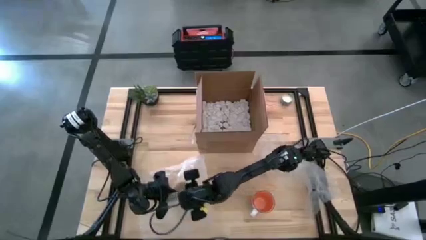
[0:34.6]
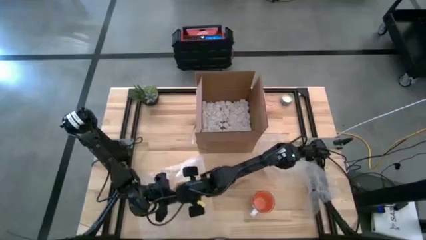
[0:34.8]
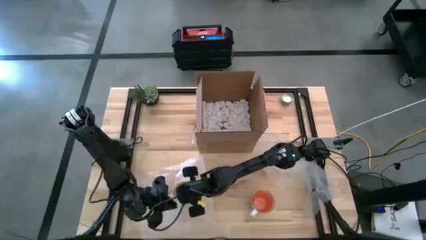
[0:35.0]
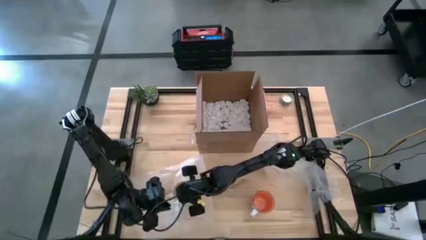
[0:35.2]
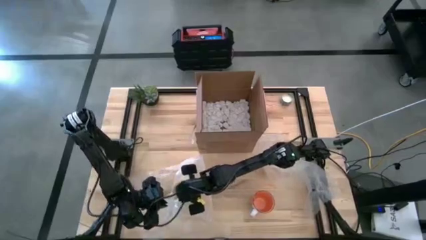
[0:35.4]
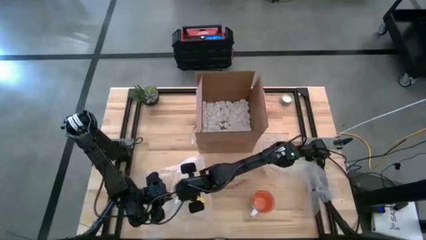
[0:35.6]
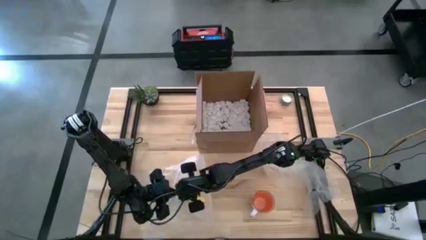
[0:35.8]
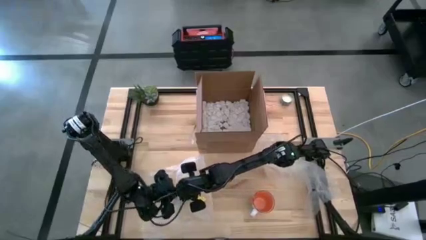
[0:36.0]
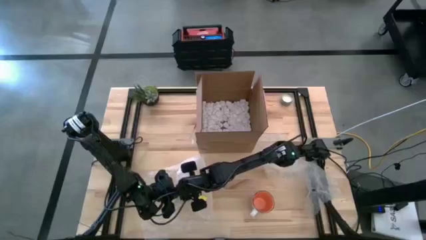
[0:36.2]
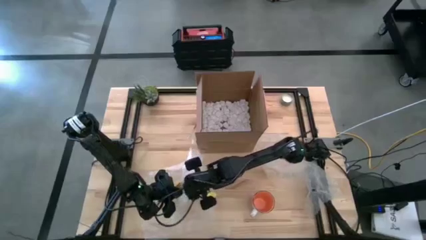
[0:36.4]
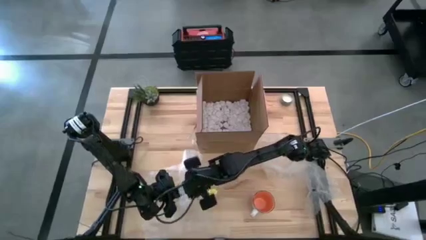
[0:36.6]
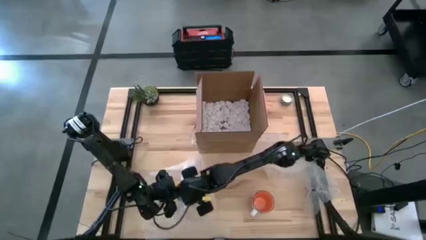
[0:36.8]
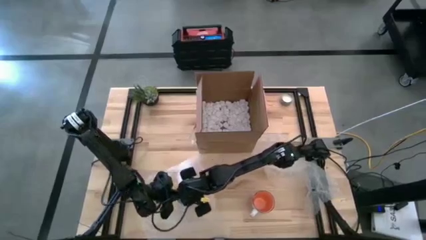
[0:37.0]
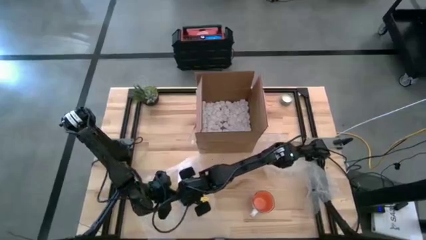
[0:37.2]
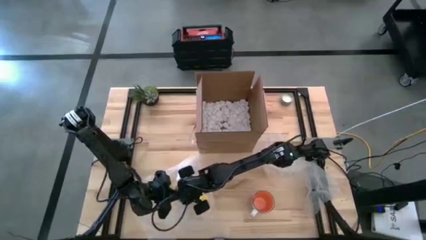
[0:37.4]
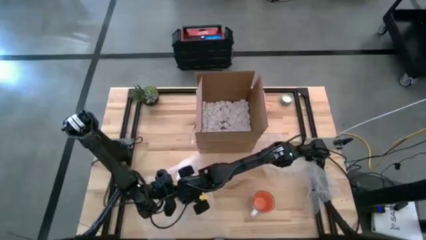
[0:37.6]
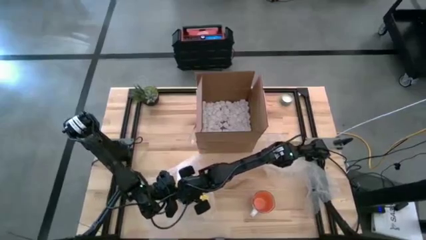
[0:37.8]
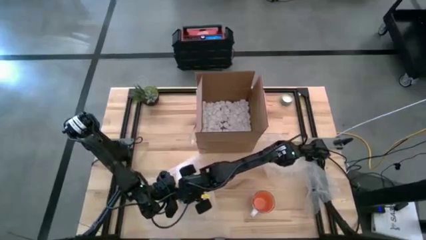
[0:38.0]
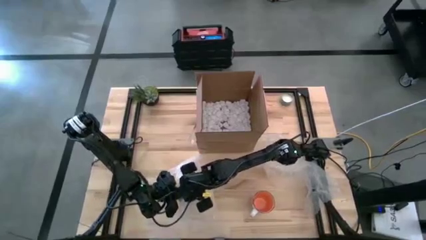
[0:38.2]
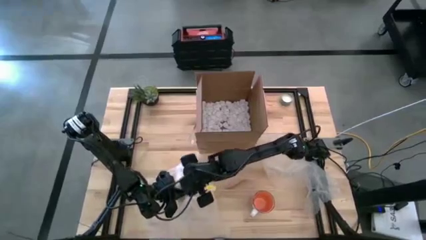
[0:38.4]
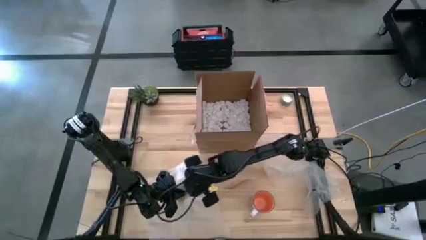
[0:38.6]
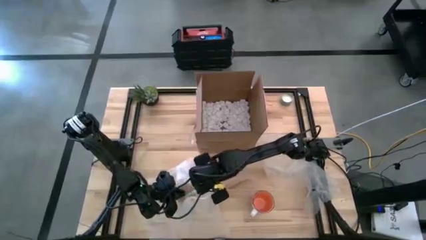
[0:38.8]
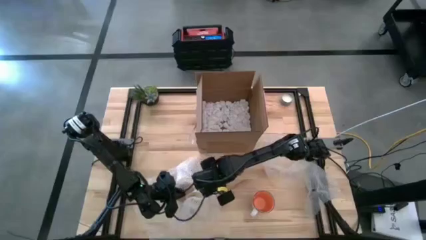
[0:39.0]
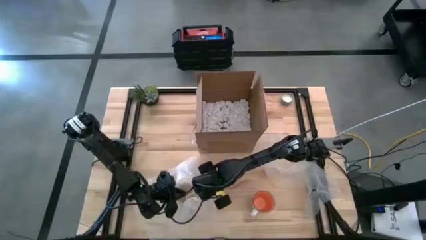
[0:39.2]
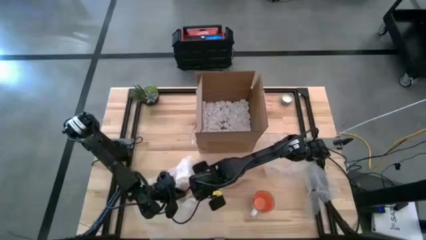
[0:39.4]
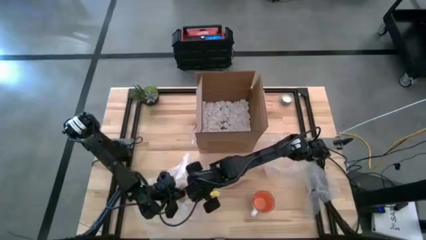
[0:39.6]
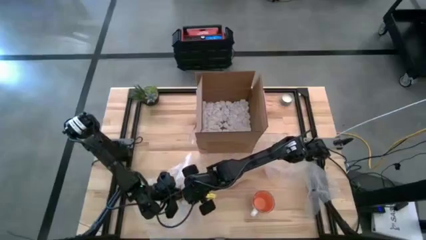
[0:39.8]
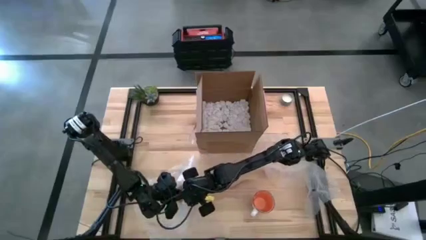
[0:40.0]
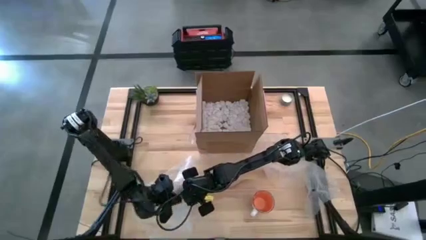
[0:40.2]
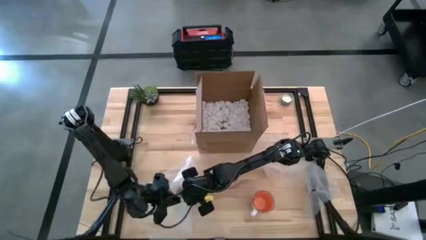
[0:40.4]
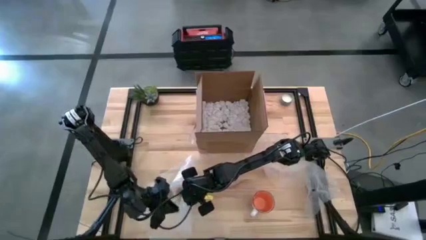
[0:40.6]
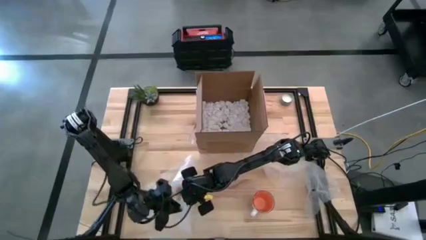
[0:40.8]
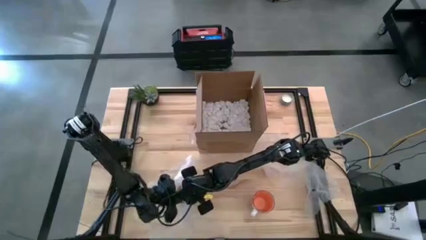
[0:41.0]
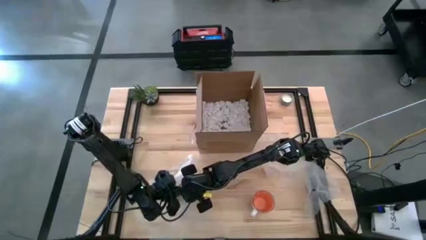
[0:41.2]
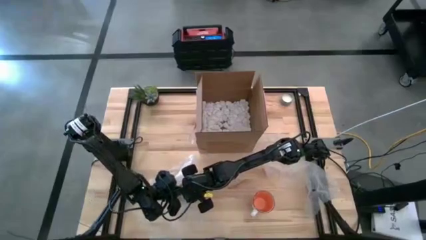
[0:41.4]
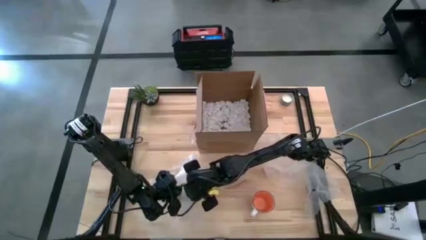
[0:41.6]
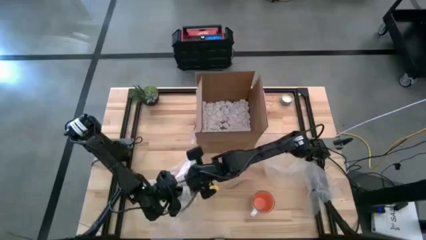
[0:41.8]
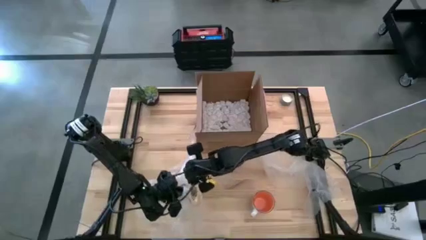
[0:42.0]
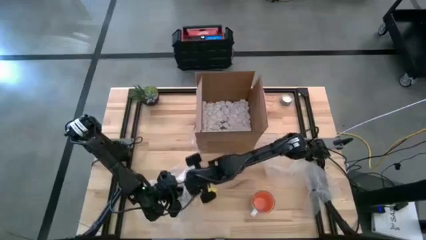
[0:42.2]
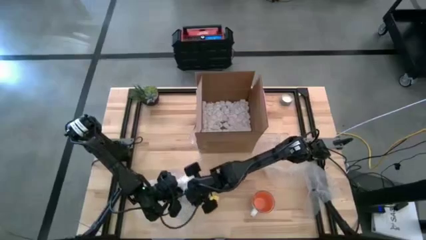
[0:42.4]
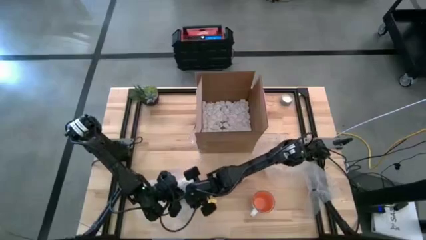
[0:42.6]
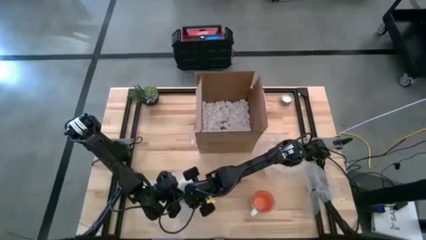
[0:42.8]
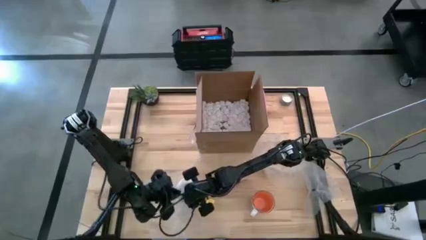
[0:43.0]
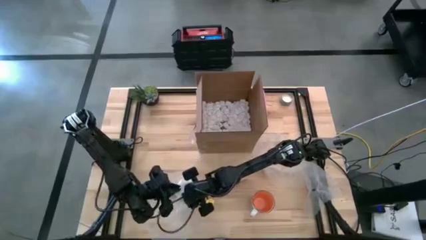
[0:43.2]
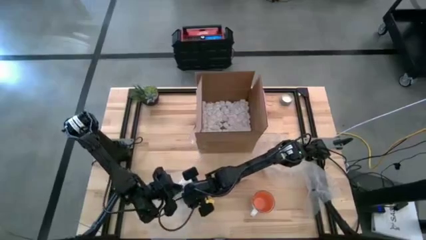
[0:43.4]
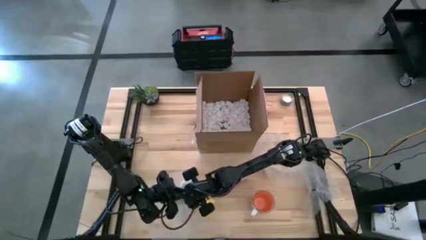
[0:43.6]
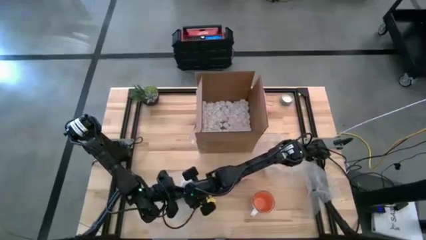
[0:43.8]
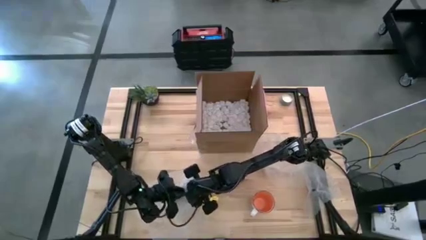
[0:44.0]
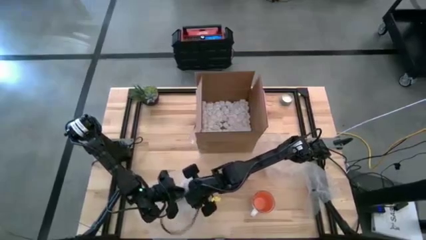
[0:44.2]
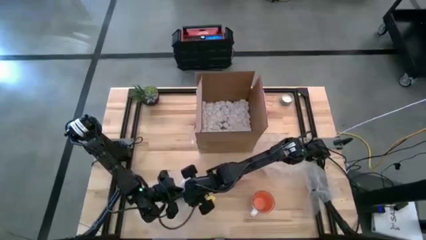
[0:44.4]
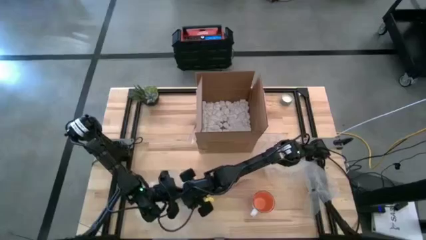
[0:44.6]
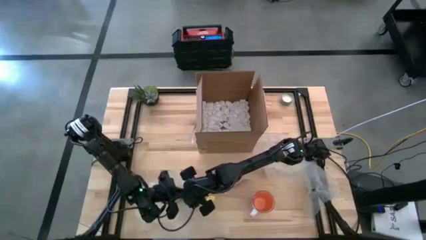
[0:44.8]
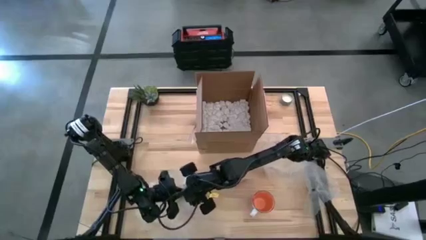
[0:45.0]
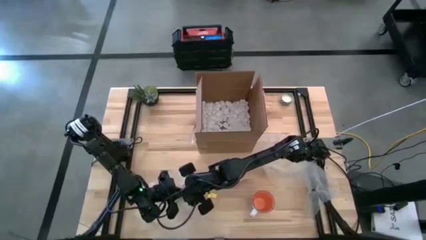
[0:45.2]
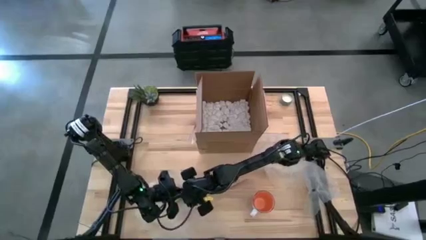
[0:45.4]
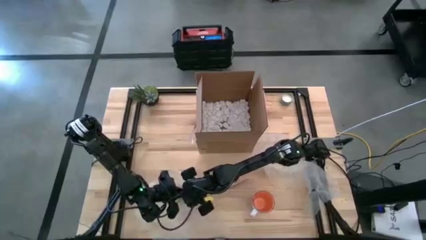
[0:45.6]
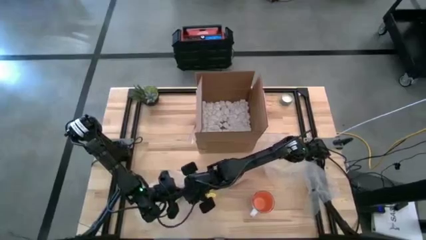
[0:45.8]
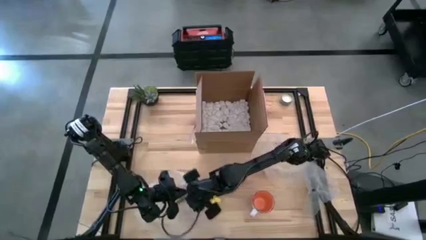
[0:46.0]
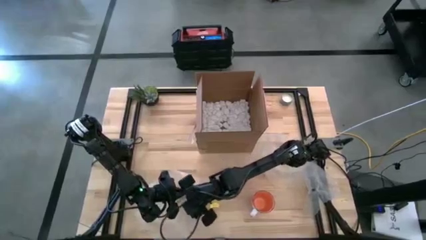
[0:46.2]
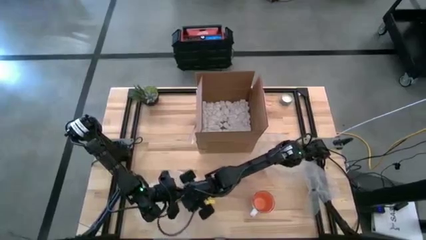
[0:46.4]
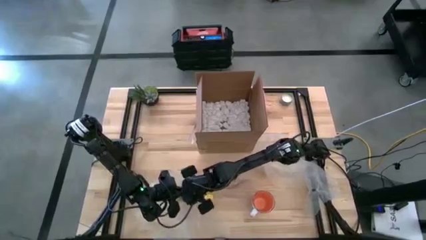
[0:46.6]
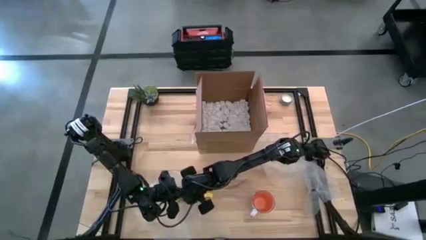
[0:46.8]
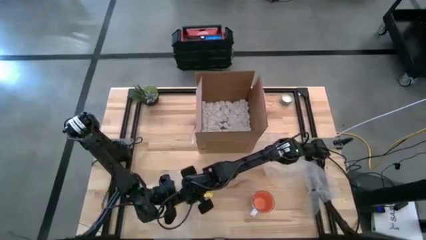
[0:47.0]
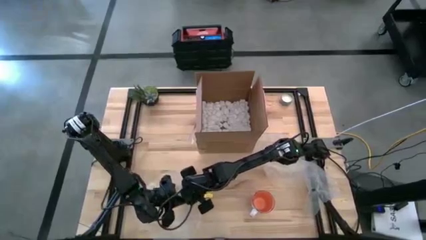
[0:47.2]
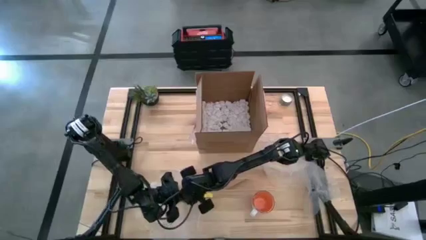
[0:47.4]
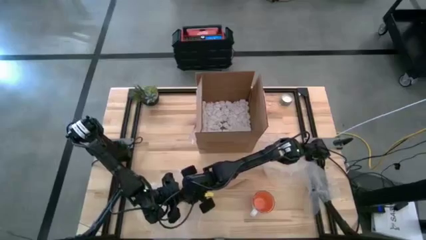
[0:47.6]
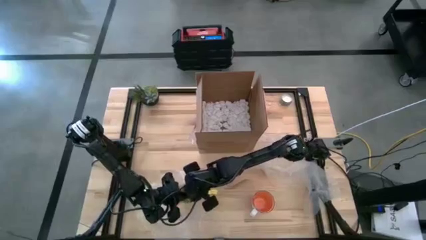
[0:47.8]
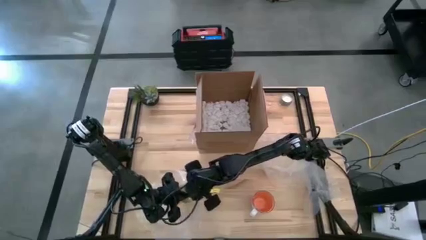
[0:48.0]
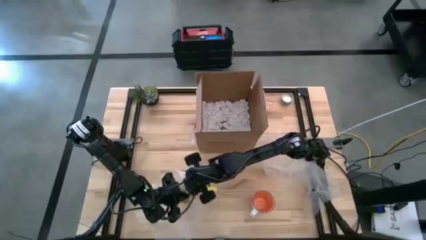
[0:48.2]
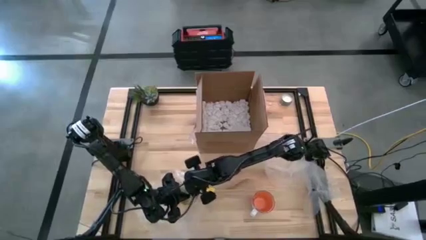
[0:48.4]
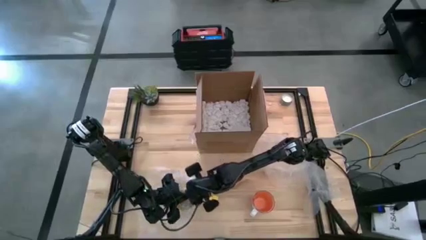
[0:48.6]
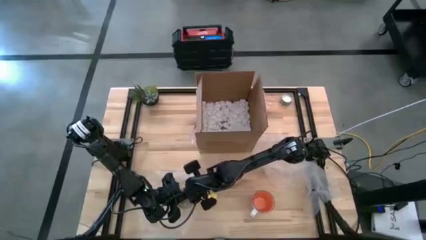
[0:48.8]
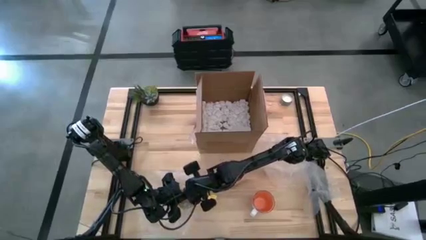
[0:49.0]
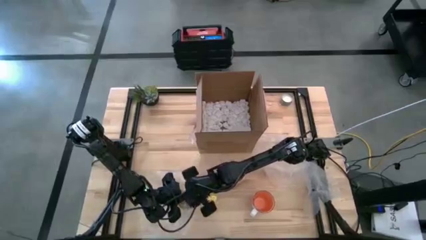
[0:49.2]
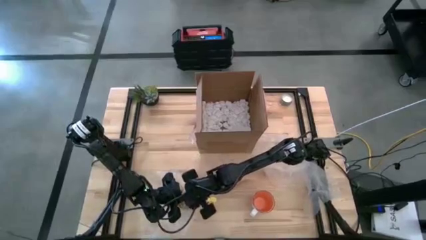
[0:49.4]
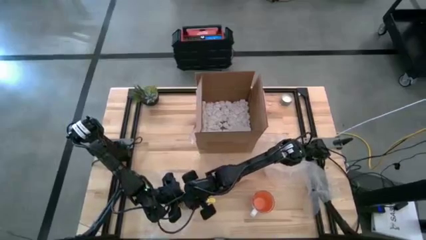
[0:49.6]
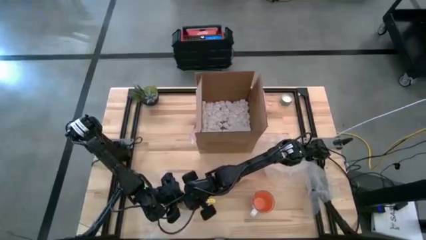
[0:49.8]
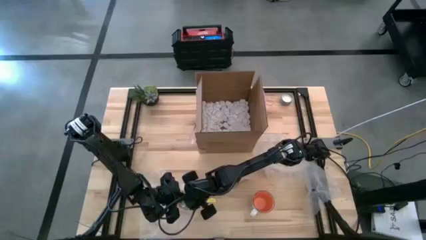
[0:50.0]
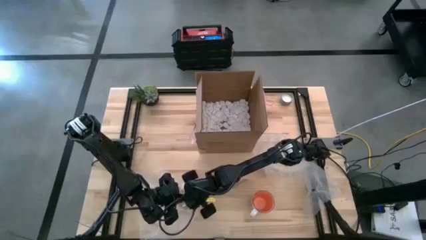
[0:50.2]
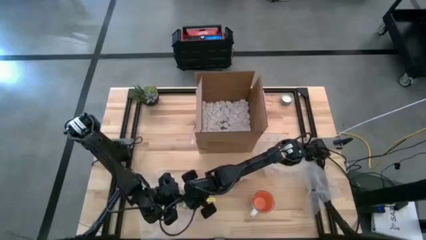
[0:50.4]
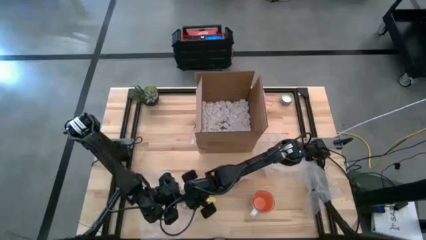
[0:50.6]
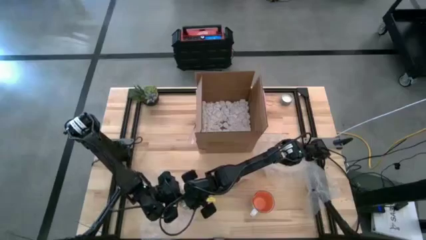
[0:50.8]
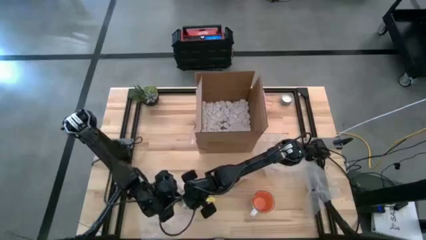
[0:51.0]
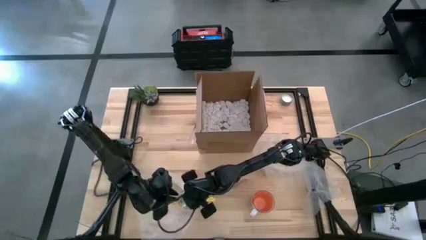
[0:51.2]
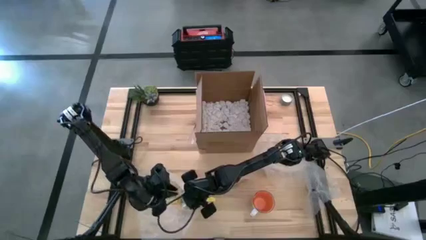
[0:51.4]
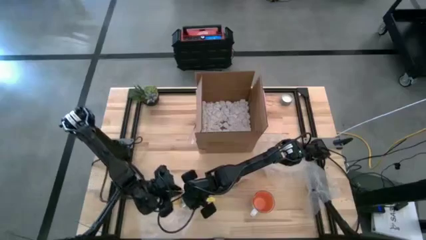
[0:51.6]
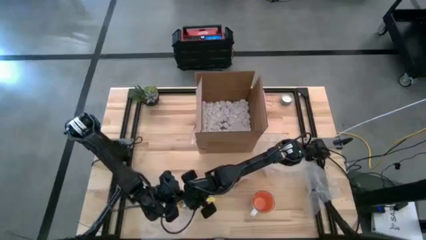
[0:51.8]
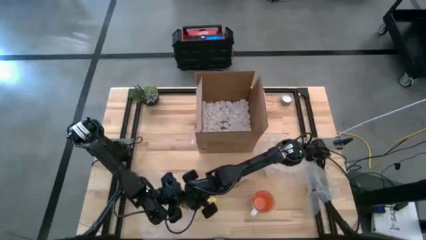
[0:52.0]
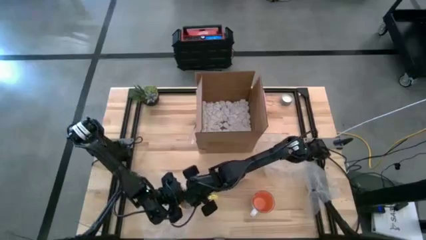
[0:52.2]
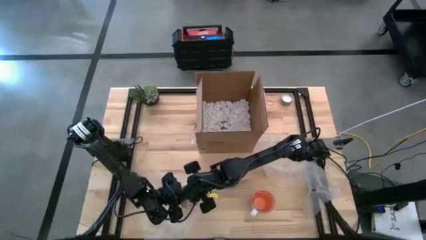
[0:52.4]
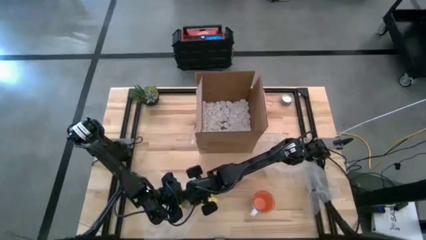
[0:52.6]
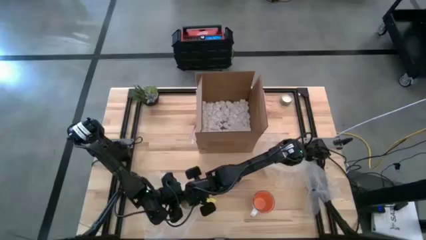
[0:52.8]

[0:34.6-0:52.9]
Task: wrap mug
Wrap the yellow mug with bubble wrap
